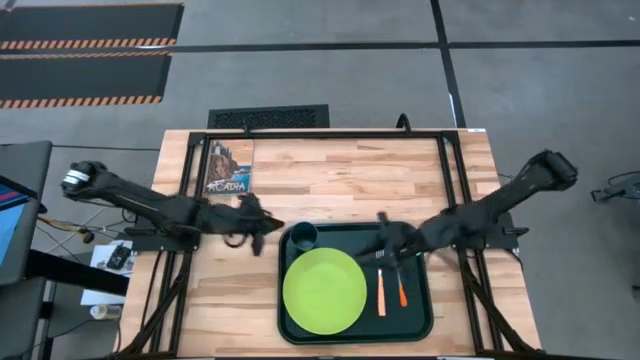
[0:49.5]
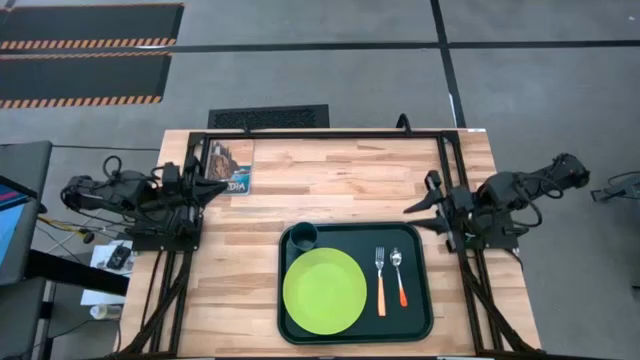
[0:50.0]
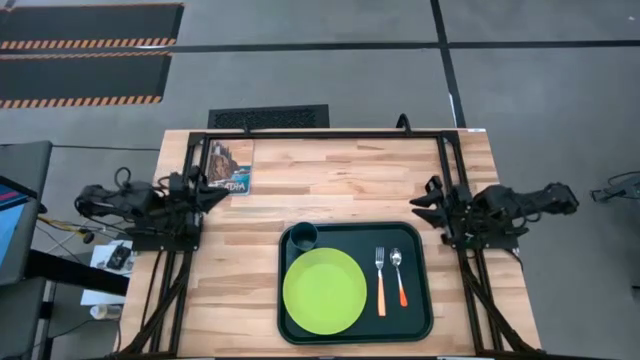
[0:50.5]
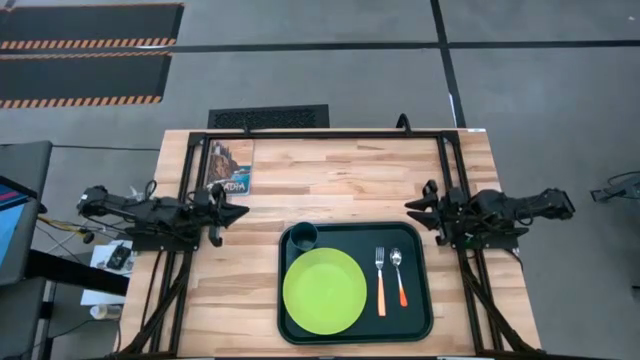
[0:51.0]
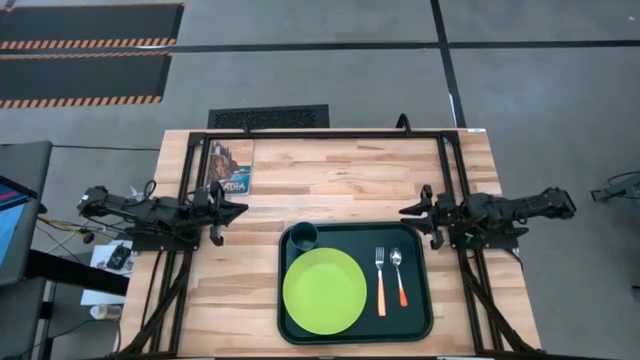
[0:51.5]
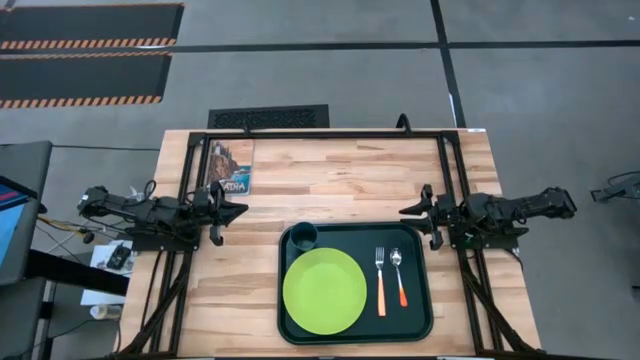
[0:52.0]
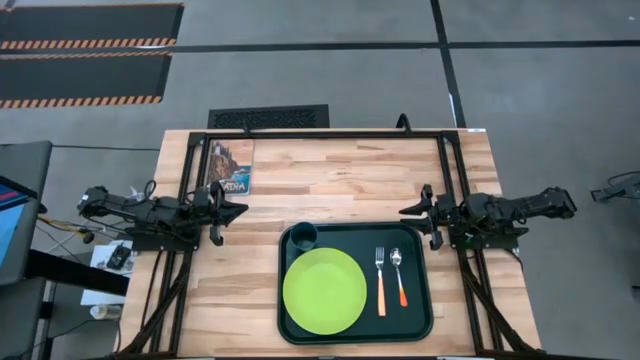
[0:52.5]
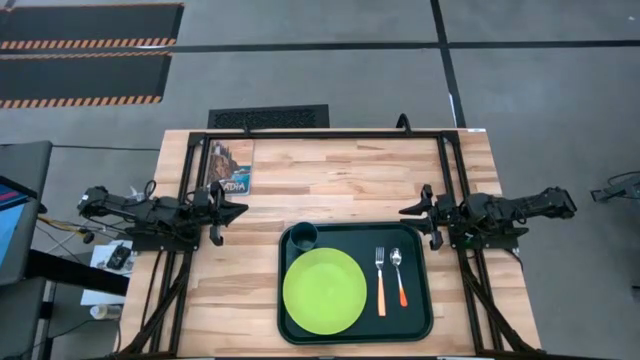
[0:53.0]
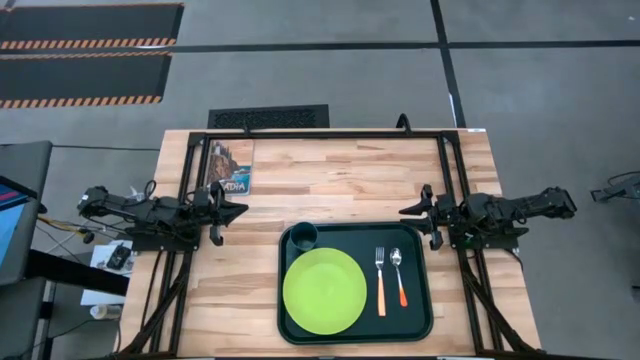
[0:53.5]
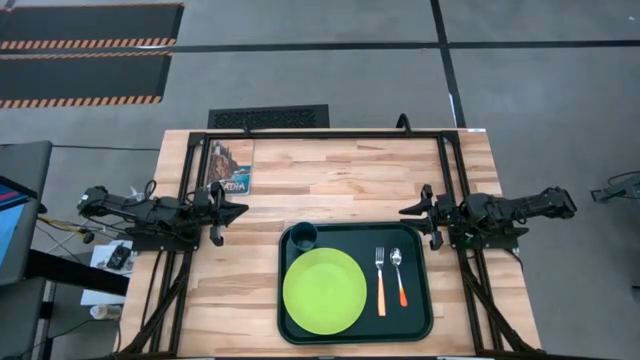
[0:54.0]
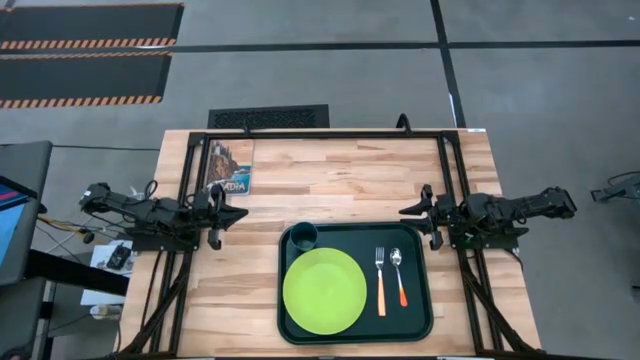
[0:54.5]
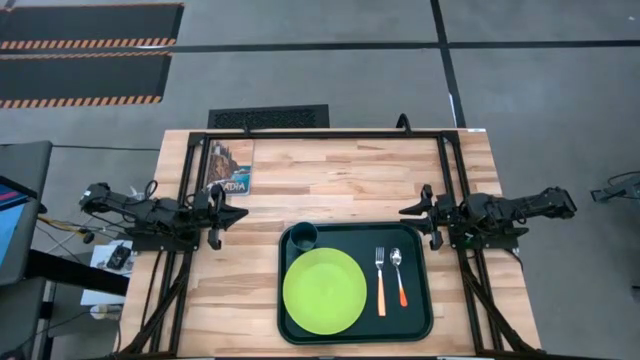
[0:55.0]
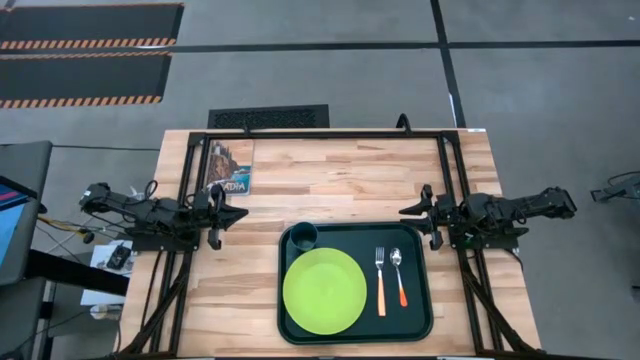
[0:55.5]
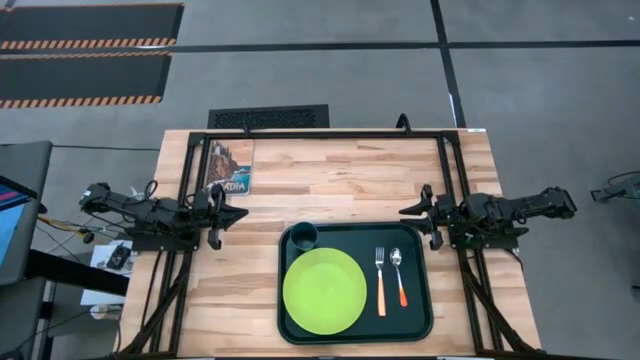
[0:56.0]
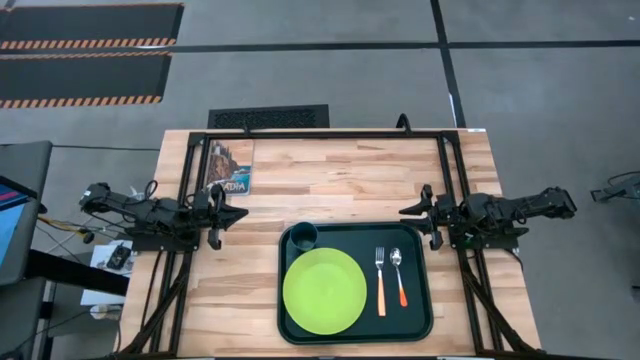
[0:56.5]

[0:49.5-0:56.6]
Task: Pick and place plate/cup/fork/spoon on tray
Return to home position

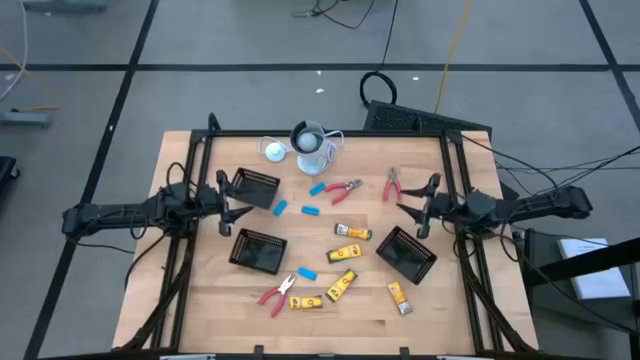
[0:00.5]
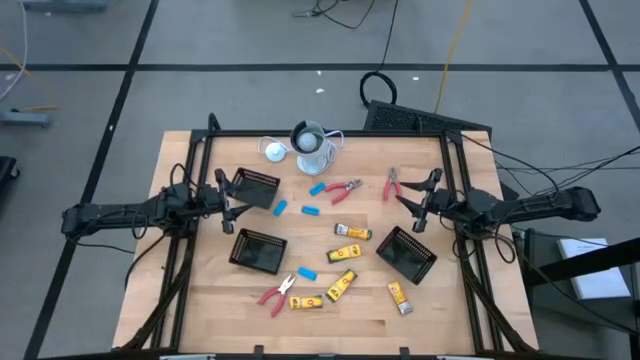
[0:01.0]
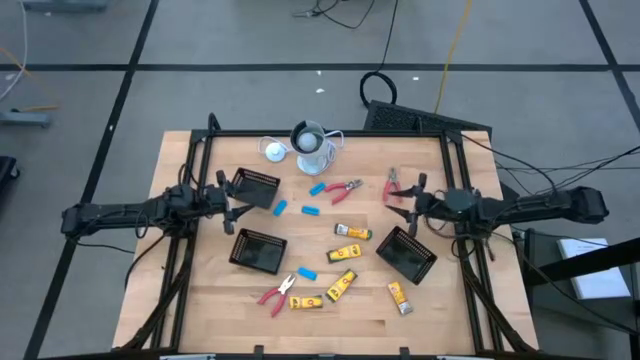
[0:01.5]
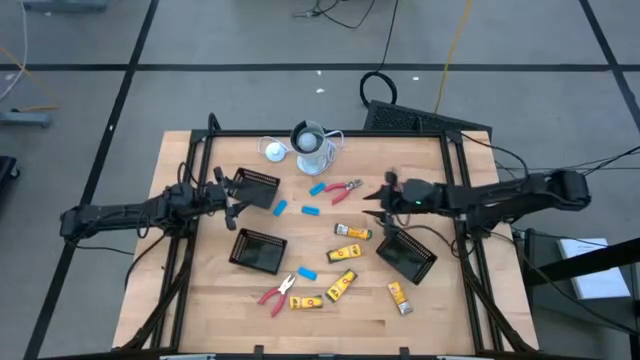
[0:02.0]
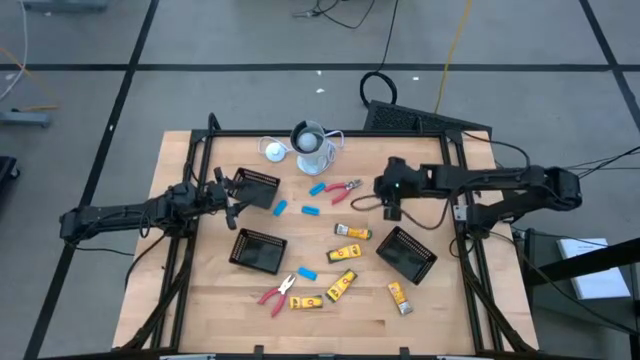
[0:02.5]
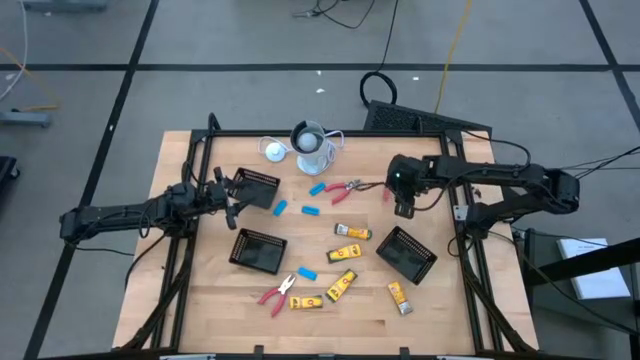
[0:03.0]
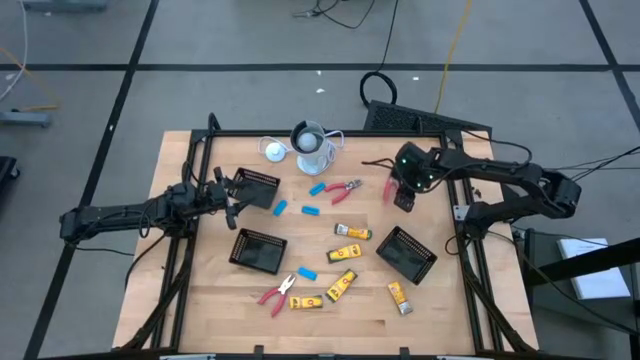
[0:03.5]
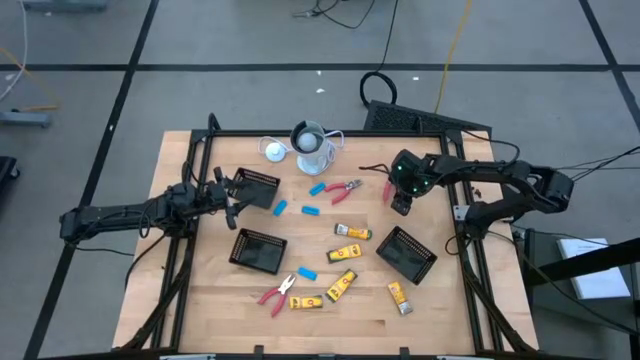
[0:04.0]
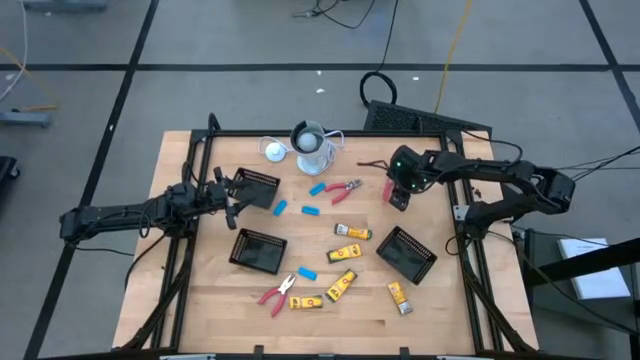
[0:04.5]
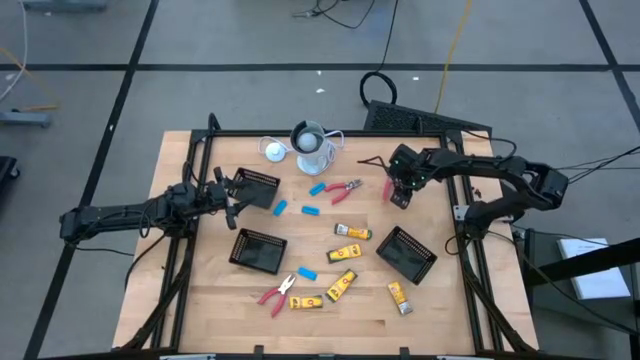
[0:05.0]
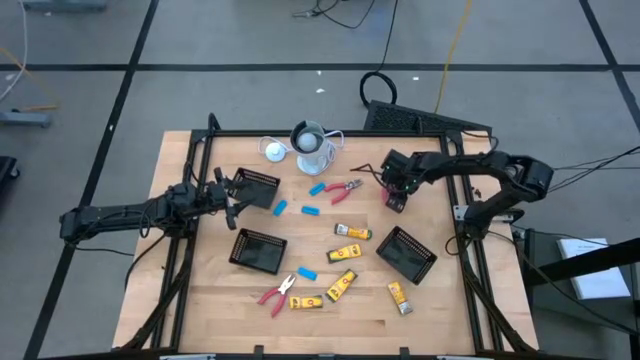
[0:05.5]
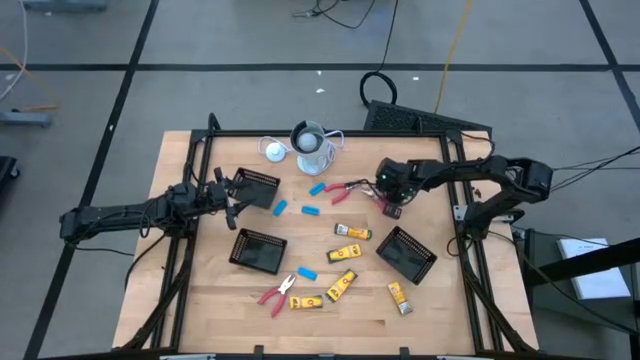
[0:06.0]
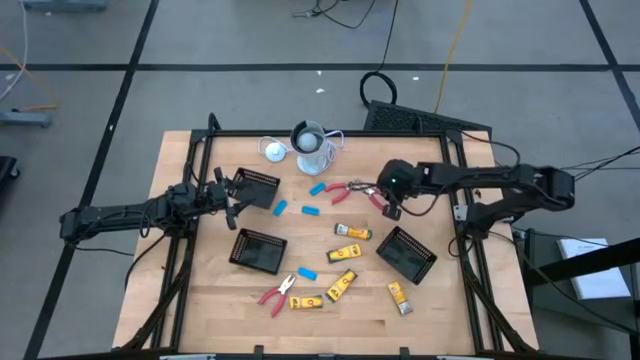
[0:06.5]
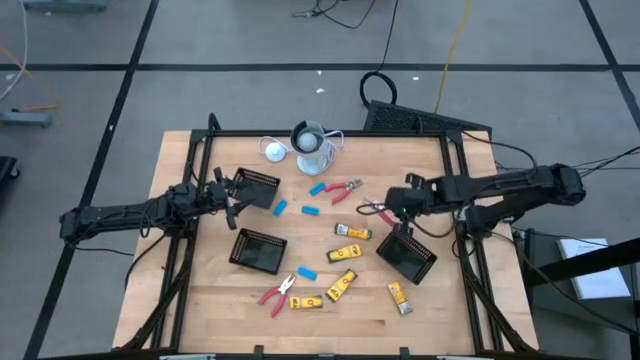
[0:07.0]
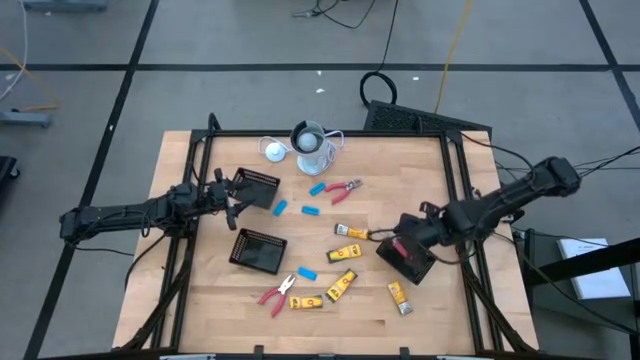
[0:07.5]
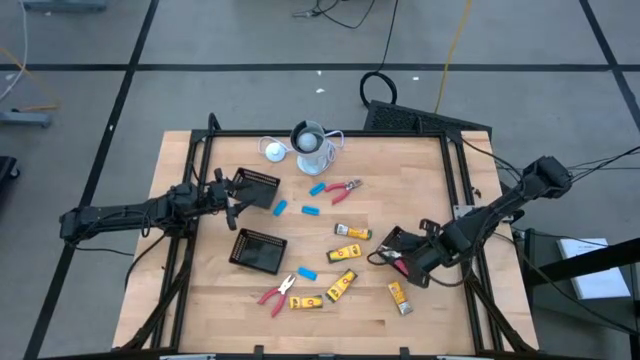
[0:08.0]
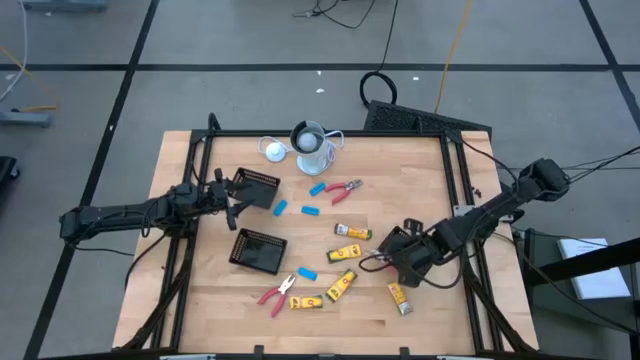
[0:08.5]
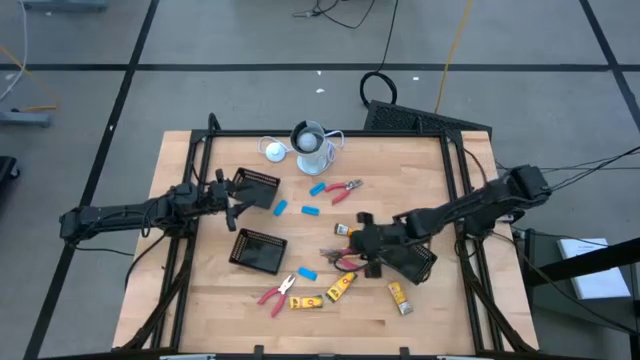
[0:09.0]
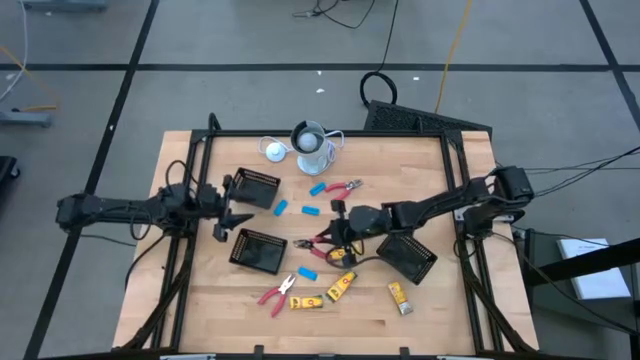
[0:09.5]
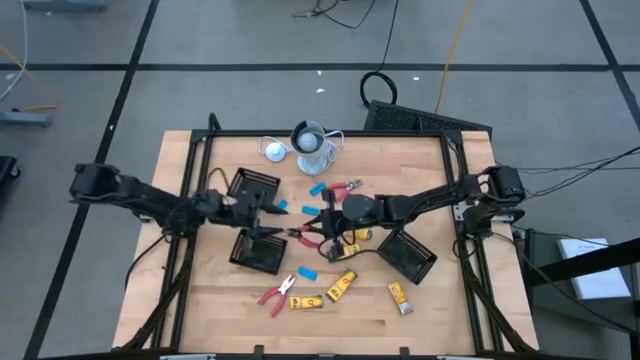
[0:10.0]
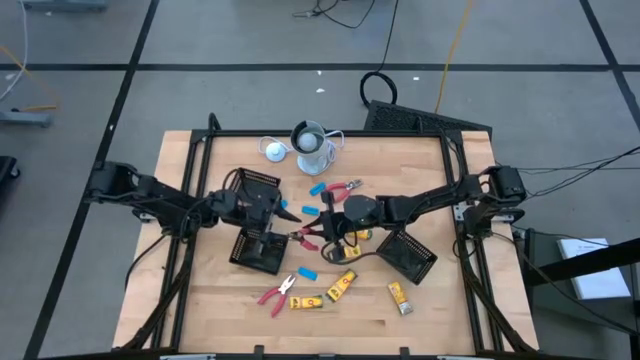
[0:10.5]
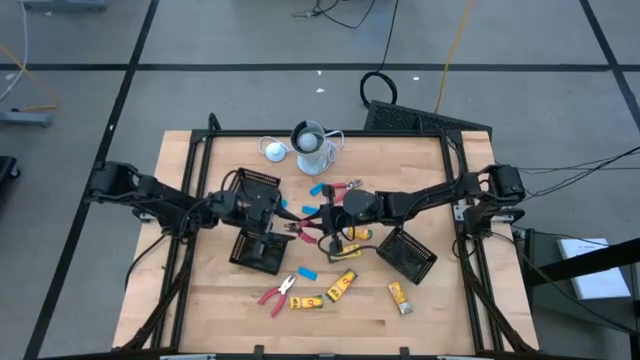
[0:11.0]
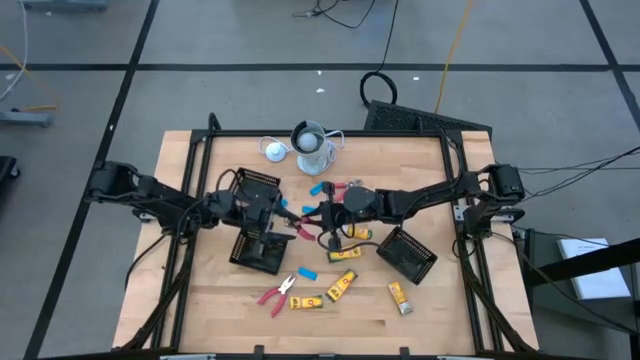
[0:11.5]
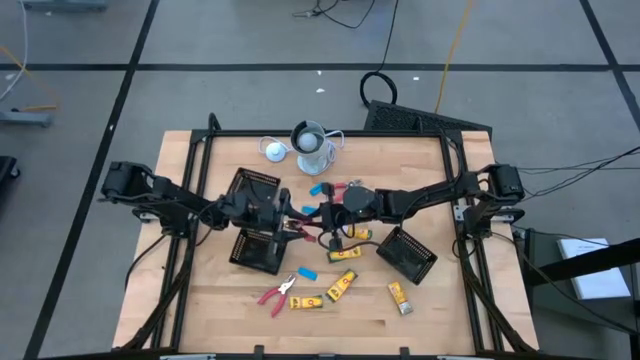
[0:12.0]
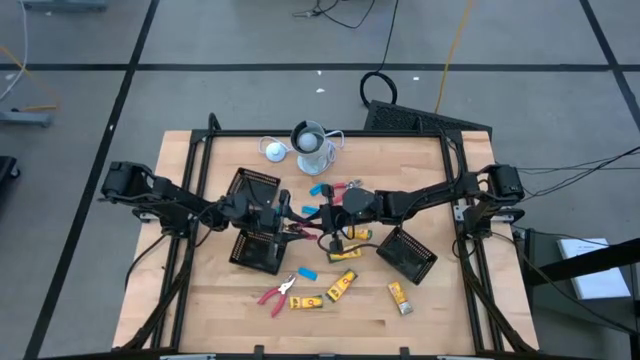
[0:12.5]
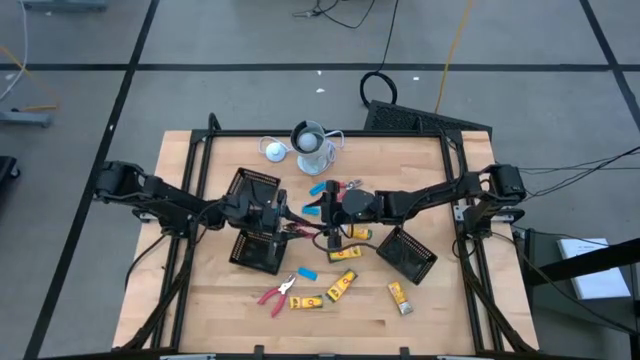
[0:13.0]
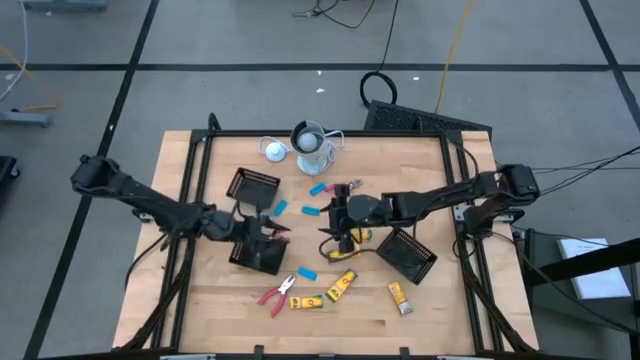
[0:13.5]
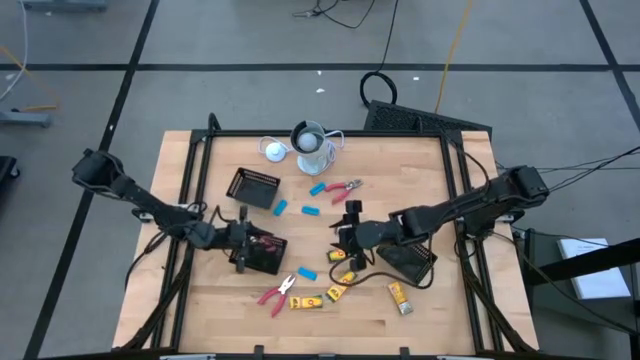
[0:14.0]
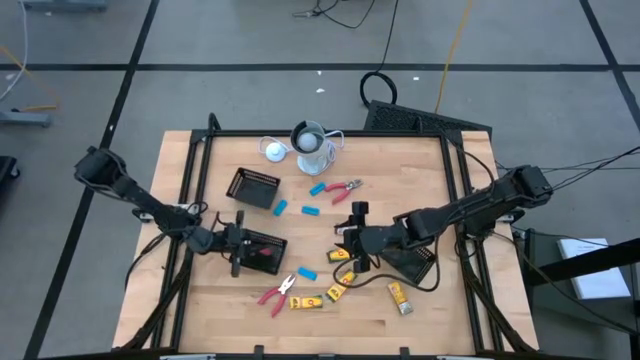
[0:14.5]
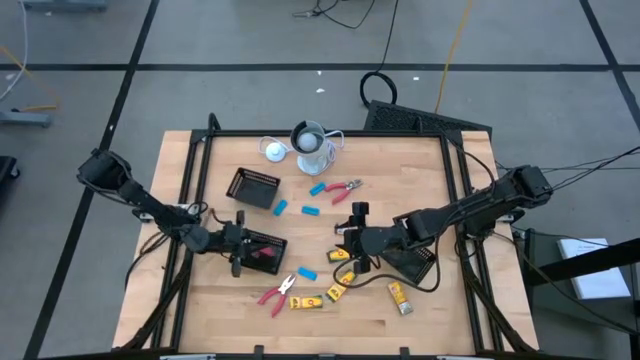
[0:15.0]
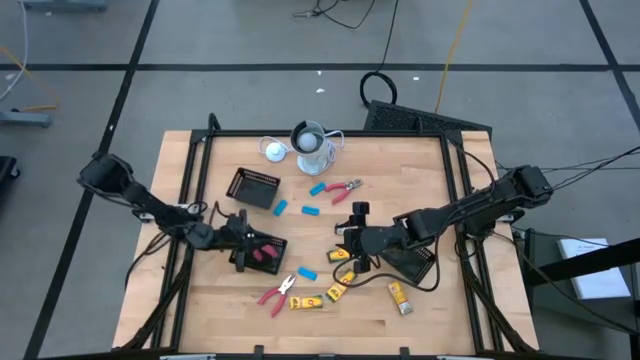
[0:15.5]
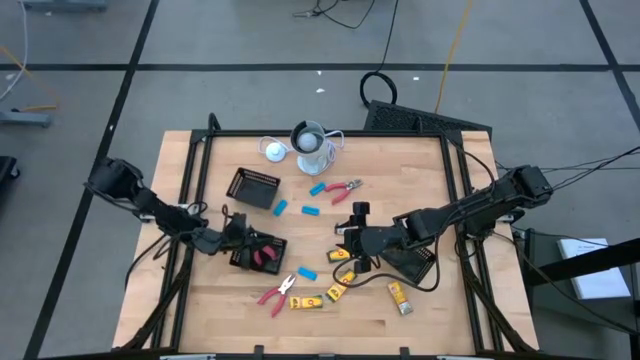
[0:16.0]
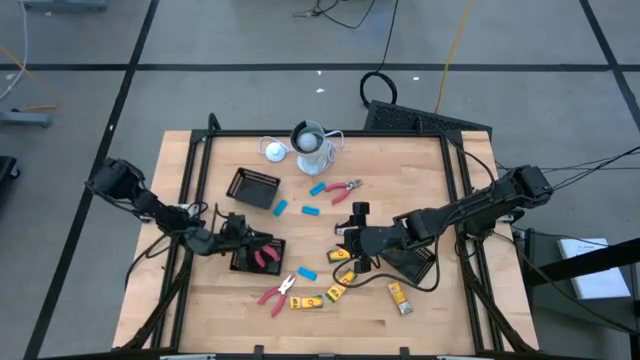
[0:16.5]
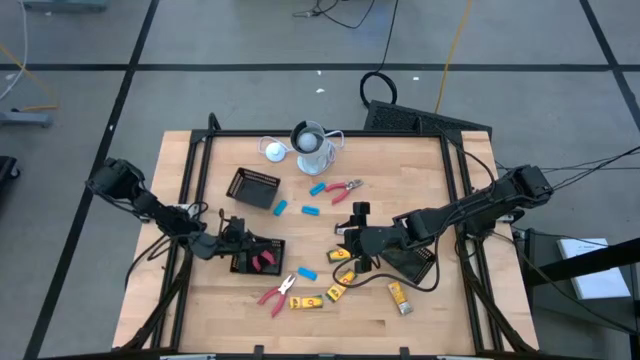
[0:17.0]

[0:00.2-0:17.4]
Task: Pick & Place School Supplies
Put the pink hole puncher into the bottom left black bin
